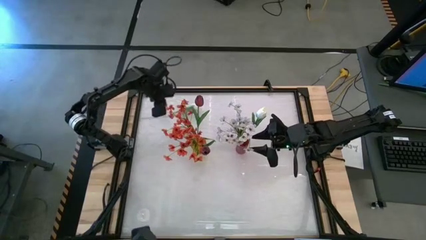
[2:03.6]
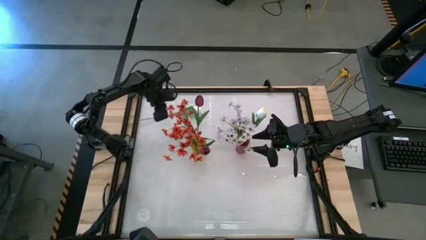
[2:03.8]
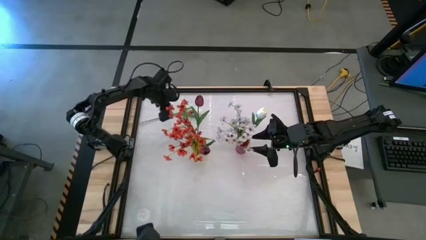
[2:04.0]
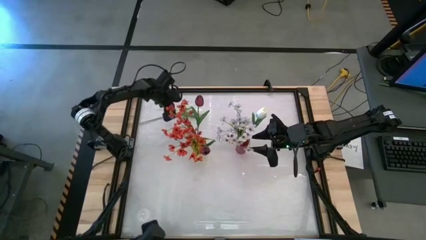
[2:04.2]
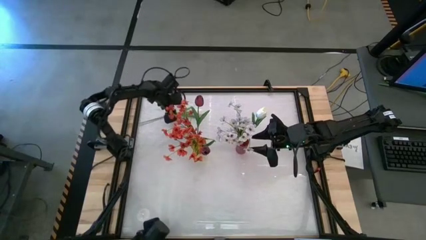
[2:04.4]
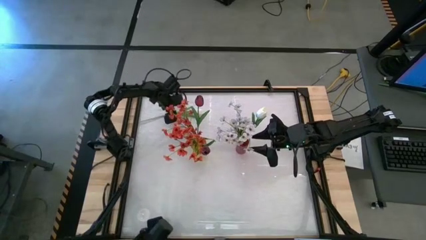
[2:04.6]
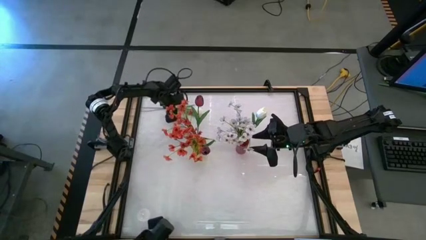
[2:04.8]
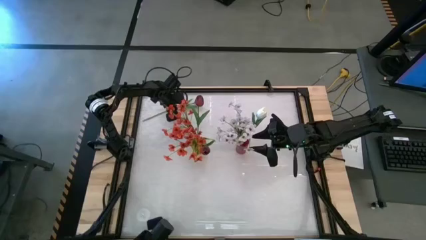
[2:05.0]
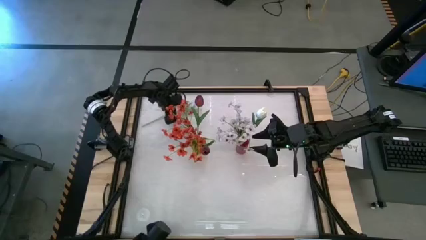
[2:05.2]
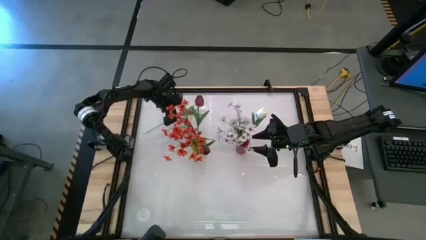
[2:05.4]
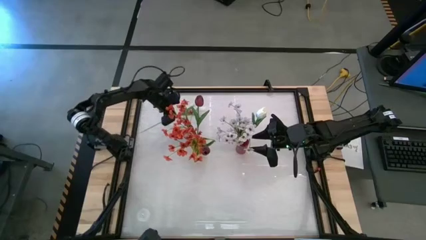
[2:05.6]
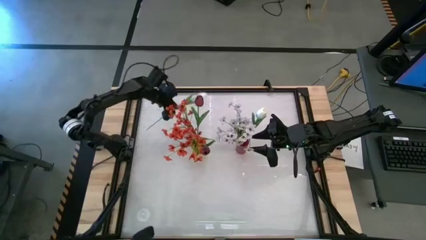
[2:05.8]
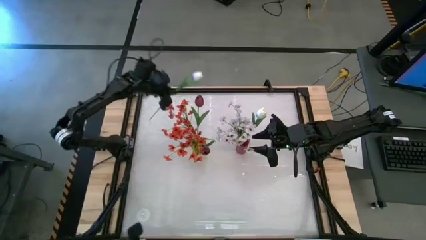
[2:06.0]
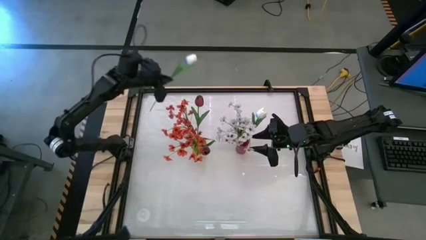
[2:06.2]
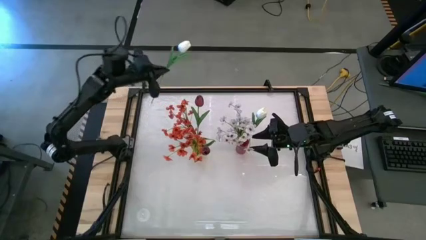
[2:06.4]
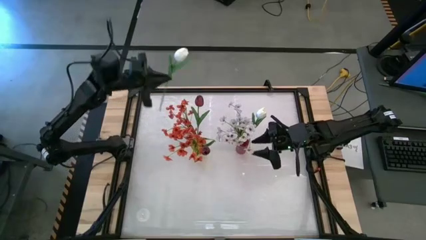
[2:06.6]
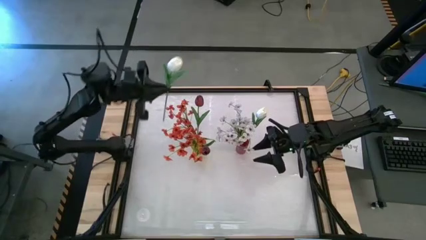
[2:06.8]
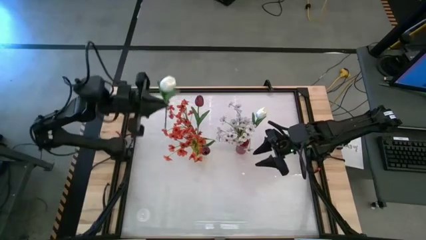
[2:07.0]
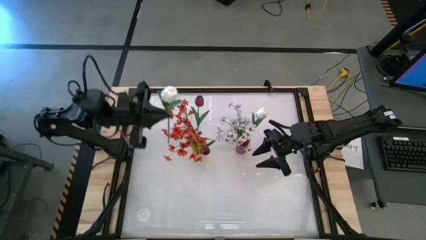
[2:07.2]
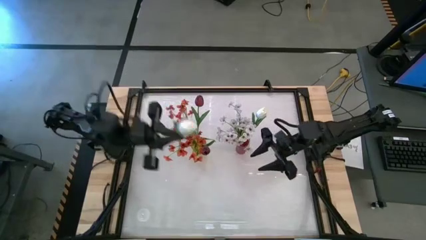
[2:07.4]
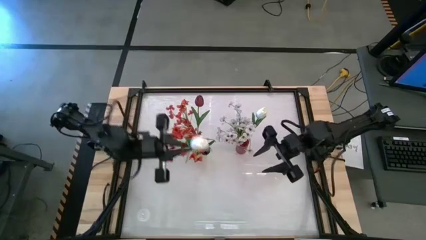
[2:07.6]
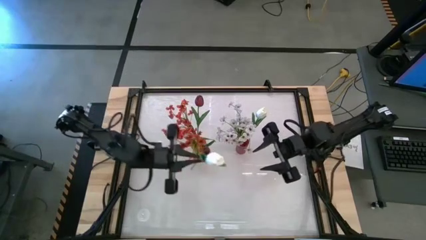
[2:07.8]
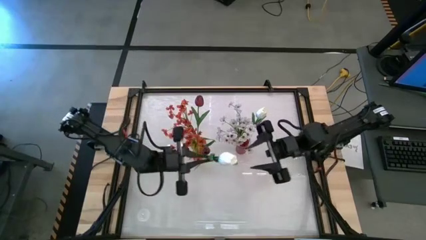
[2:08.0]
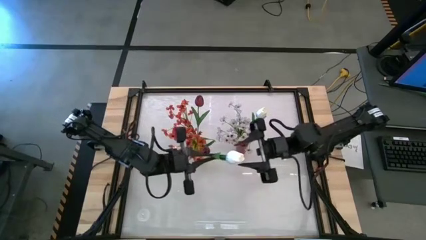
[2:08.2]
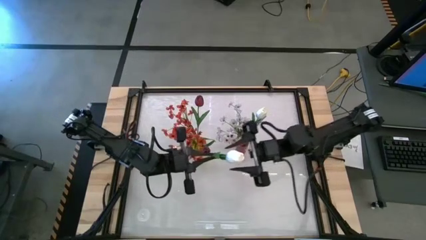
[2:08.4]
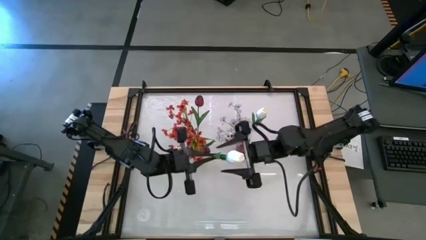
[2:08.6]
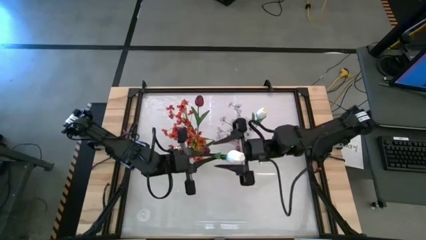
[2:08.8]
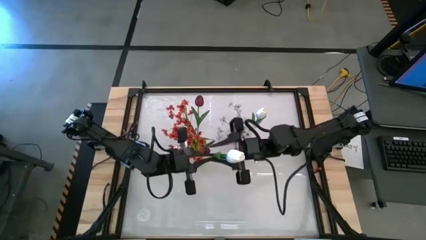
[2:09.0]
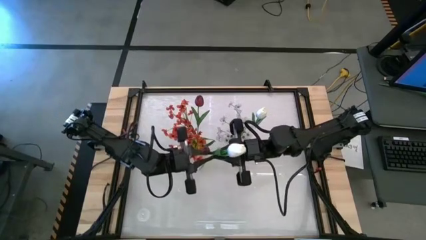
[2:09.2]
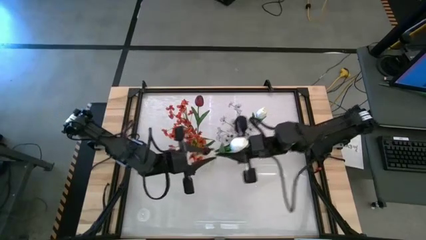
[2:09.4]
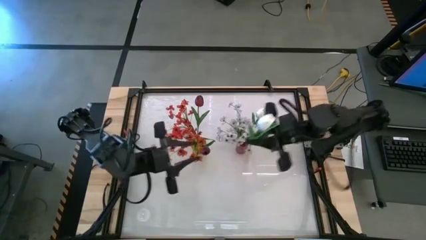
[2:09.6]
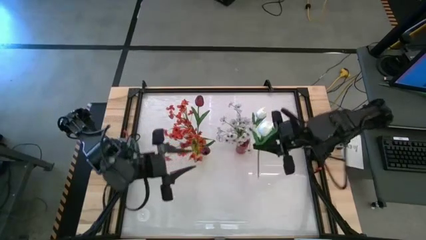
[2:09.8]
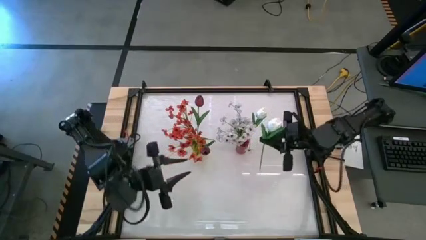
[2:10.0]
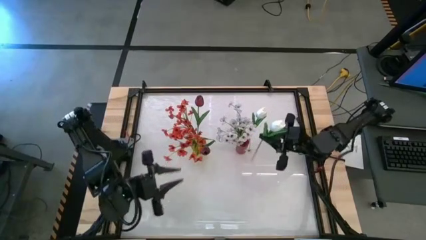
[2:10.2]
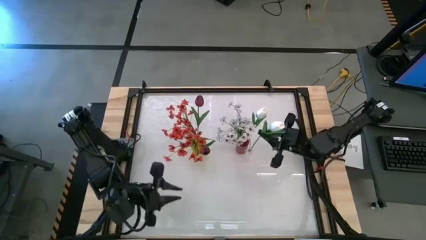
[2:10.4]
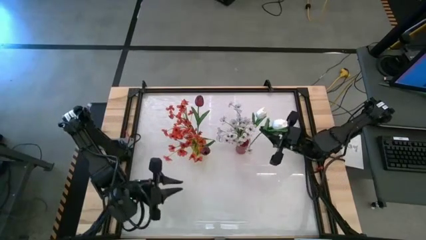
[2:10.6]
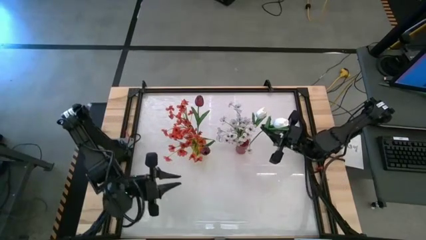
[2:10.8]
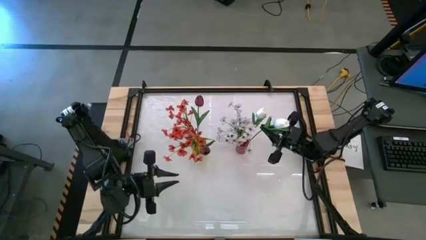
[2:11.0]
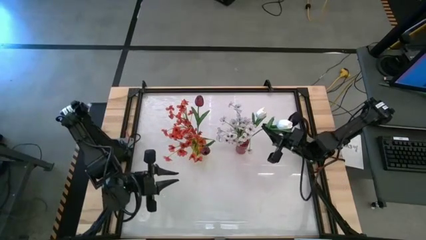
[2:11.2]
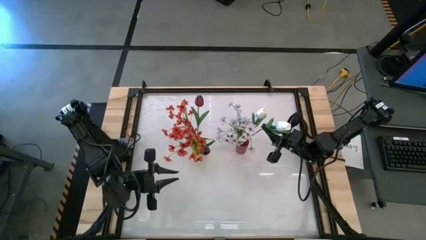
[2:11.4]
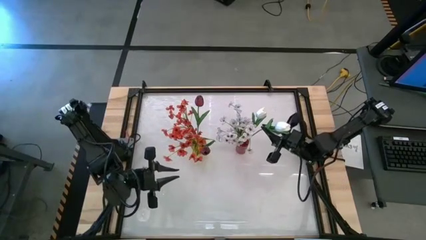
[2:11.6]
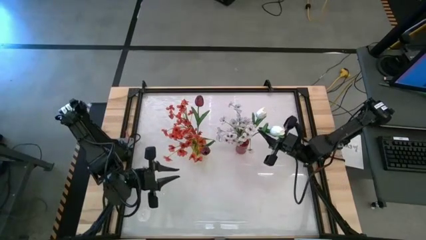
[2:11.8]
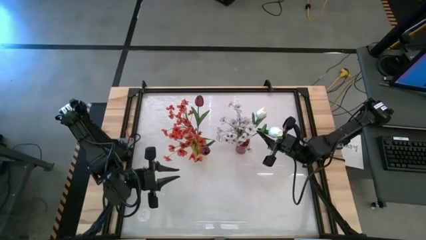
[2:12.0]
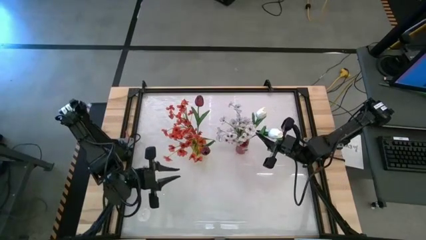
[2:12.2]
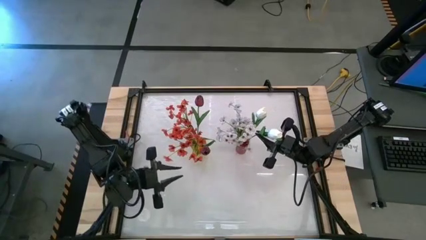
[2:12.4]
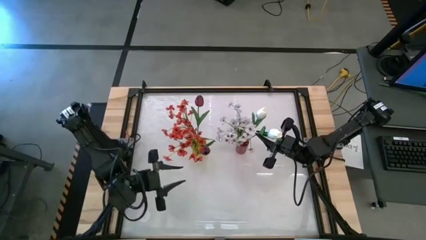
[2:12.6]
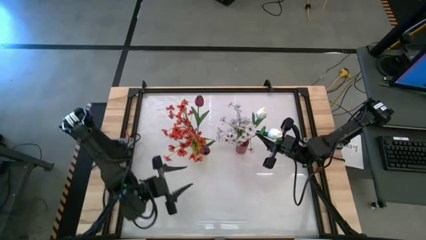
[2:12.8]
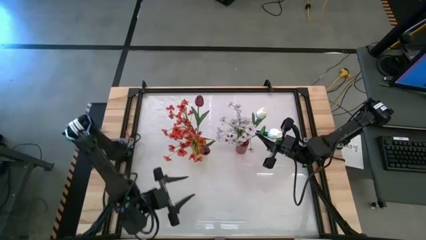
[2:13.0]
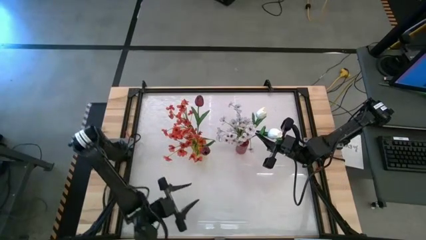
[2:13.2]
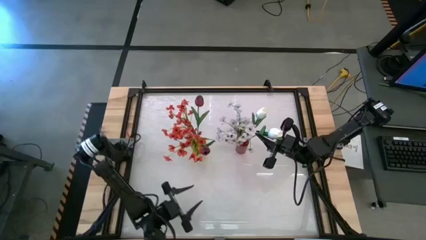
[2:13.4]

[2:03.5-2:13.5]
Task: Sort flowers into vase by color
Put the white tulip into the red flower vase

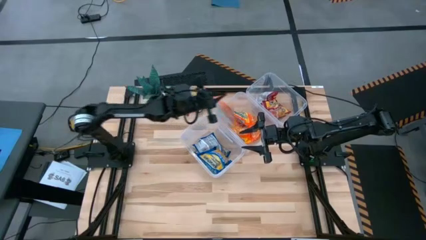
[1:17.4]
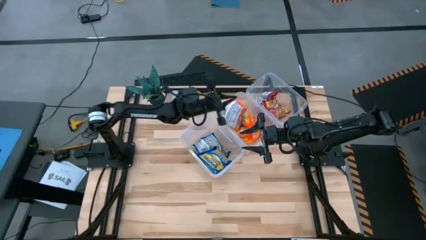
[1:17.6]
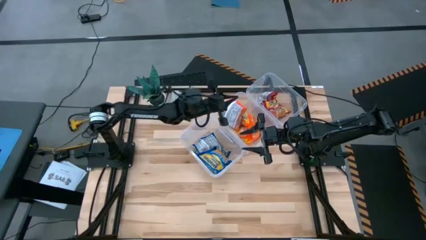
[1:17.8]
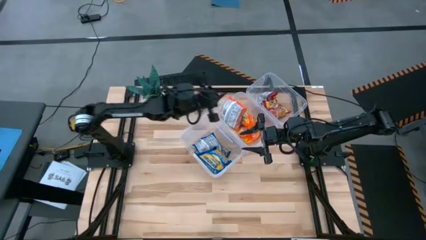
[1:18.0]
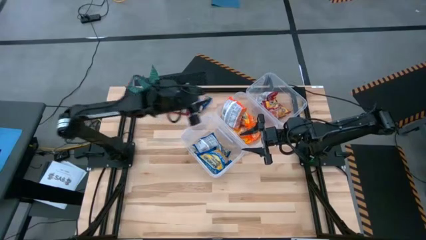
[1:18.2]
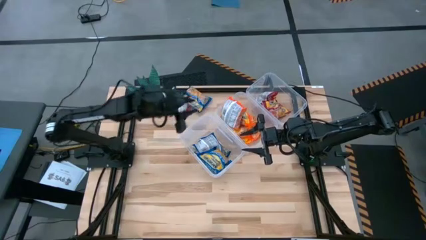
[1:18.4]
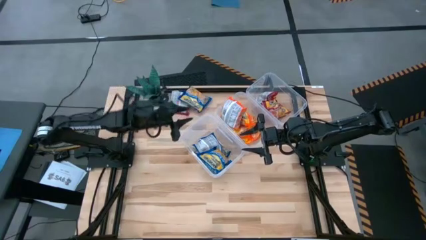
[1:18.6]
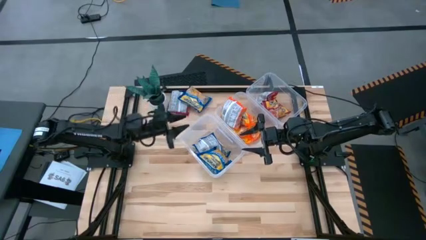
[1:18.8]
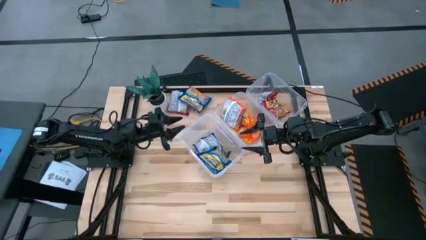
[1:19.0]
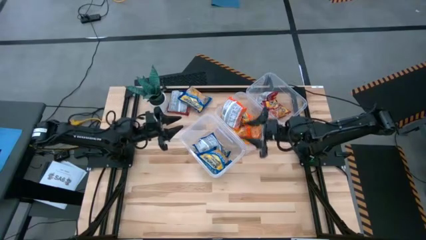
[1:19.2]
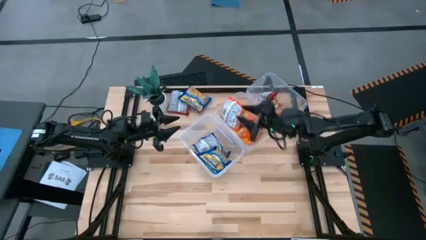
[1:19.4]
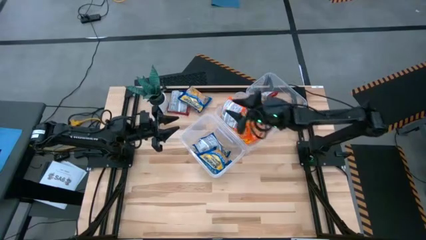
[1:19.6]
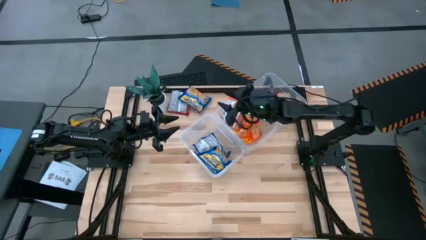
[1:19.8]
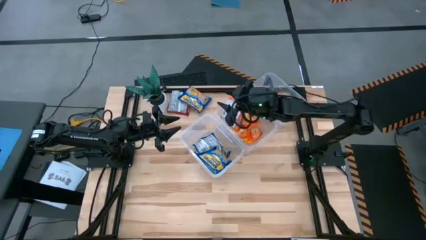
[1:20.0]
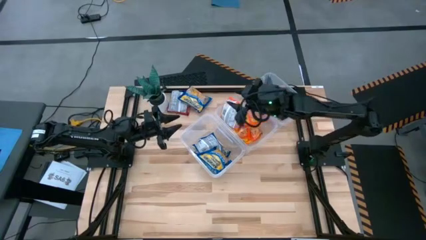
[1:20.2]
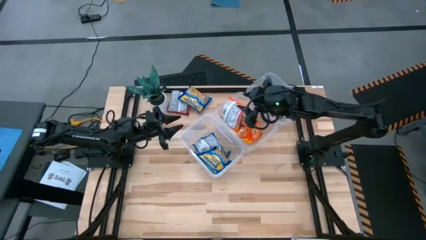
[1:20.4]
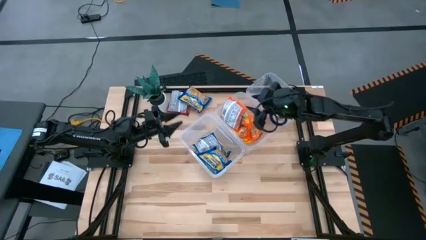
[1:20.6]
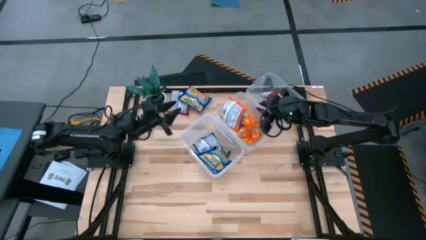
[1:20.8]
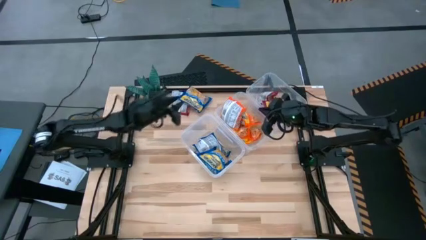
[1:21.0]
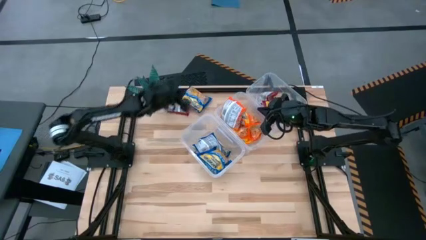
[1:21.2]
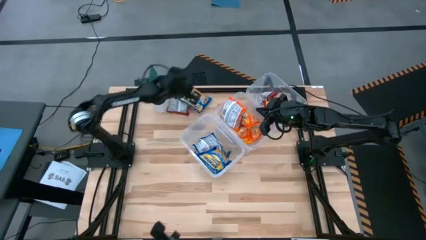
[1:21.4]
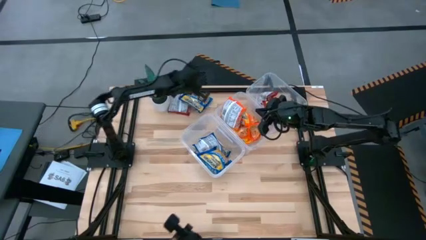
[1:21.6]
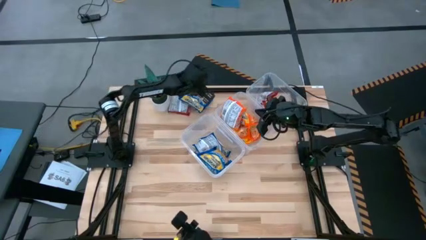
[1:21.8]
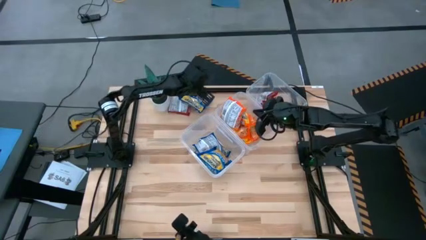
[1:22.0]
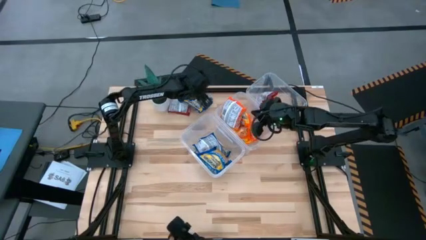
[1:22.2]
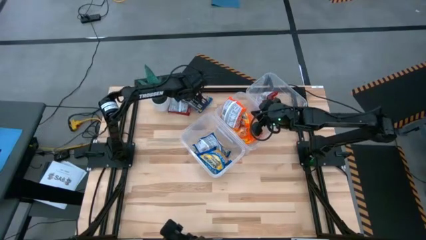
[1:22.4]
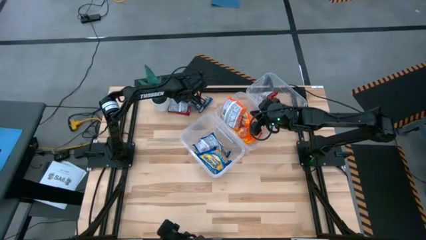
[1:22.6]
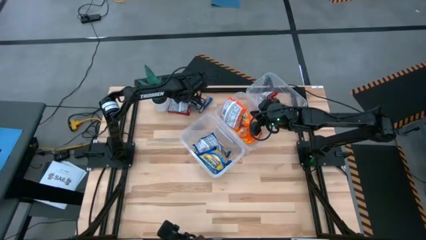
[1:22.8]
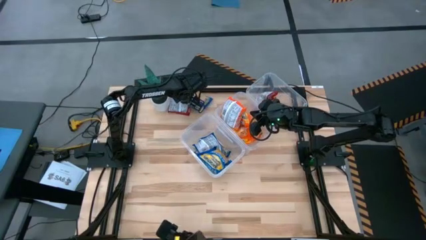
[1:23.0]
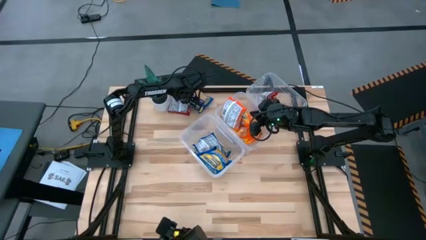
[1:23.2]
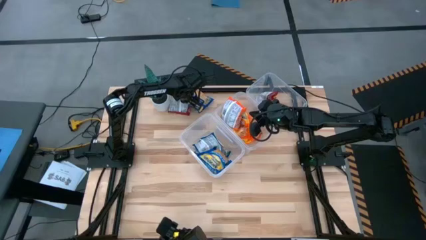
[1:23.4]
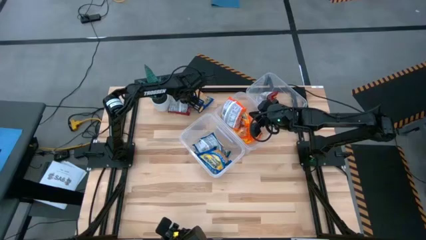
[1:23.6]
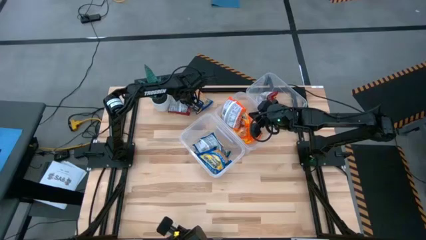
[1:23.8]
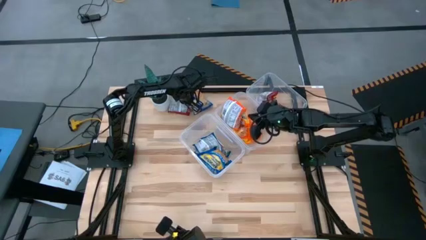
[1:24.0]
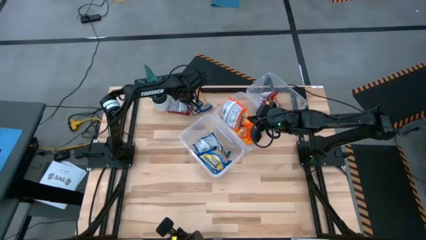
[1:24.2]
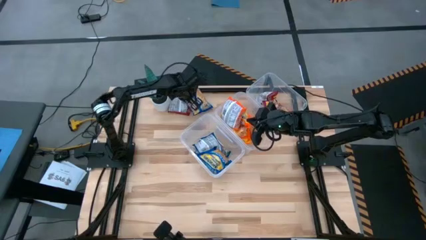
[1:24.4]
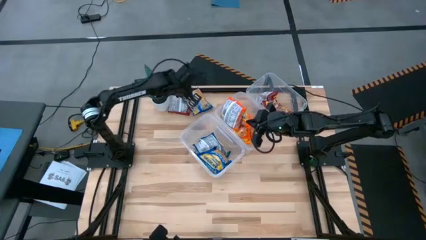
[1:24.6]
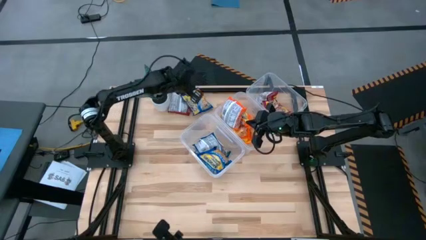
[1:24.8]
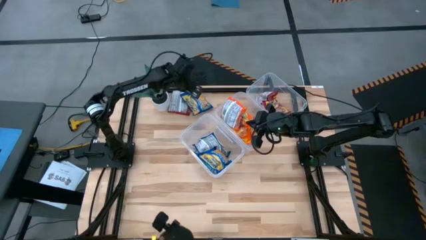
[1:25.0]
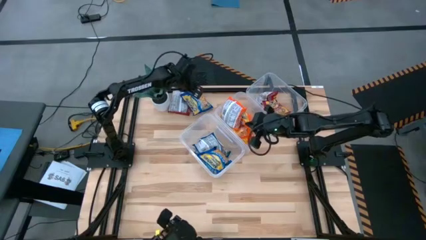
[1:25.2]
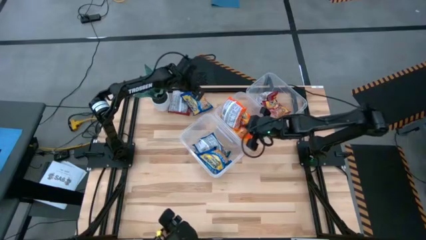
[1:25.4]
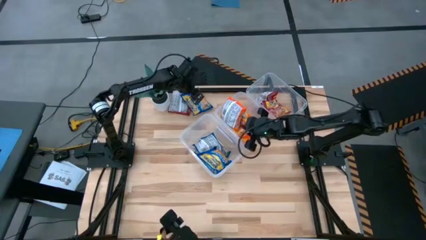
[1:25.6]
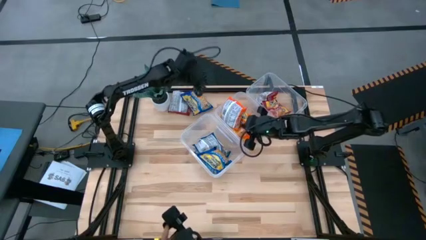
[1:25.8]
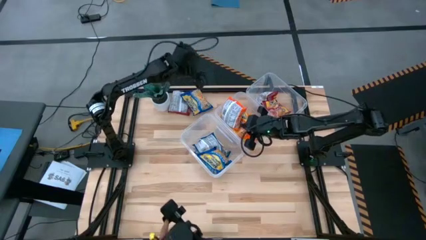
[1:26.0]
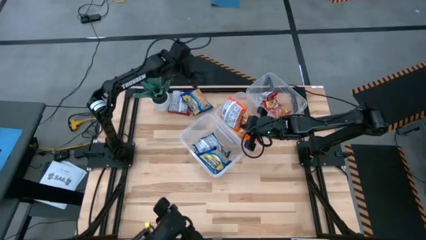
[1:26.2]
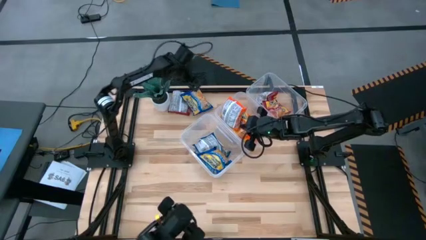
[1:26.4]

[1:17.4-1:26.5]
Task: Sort Maruchan noodles
Put the blue noodle pack into the left transparent bin
